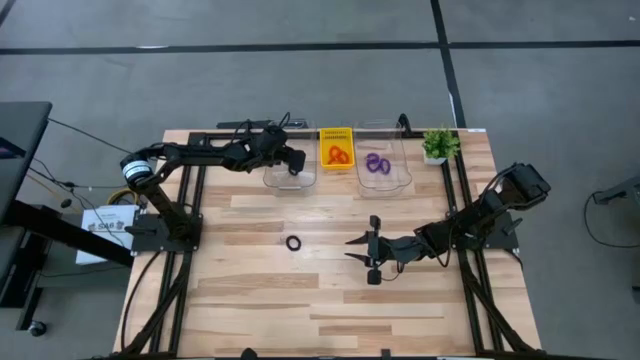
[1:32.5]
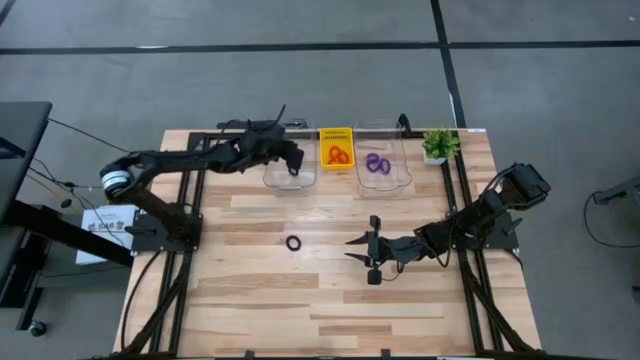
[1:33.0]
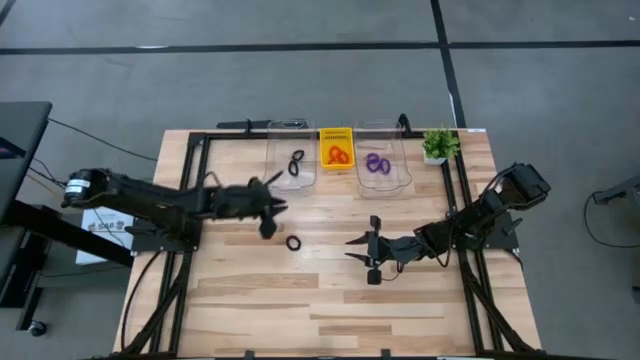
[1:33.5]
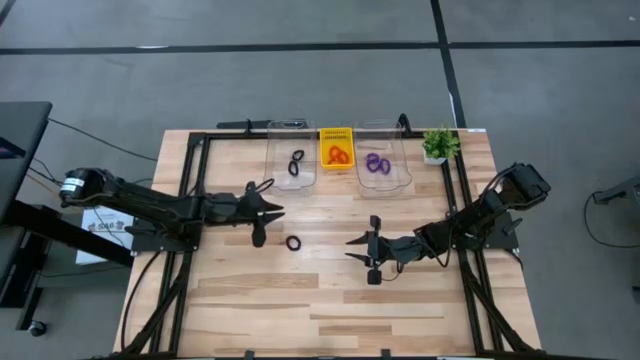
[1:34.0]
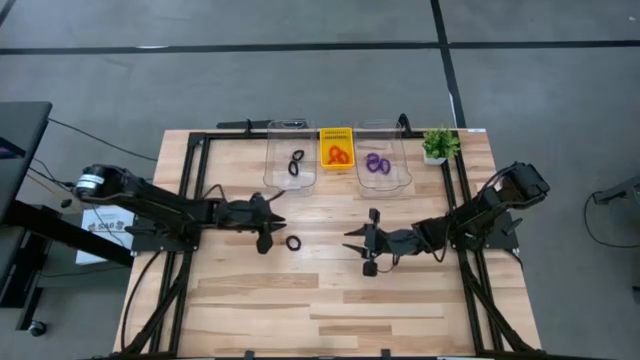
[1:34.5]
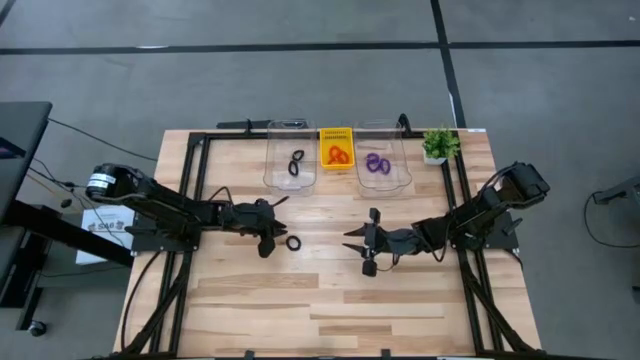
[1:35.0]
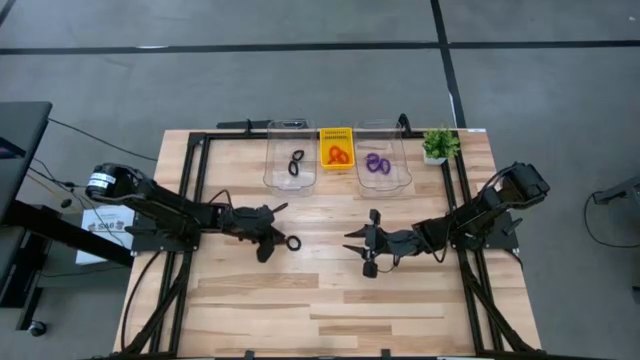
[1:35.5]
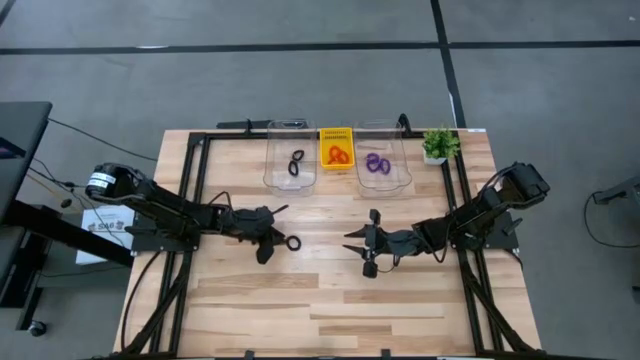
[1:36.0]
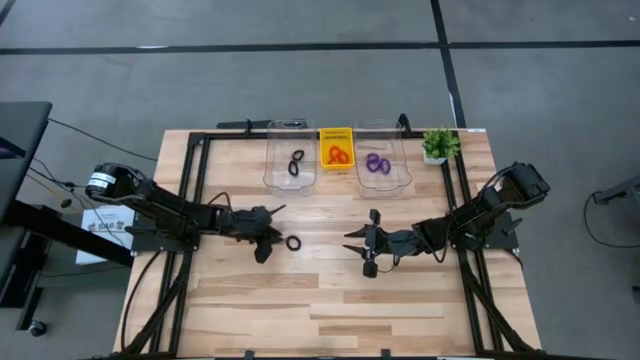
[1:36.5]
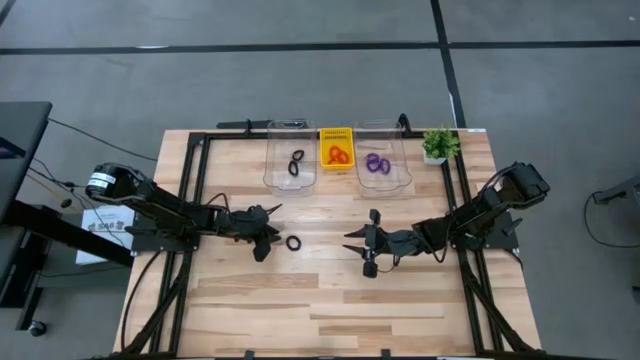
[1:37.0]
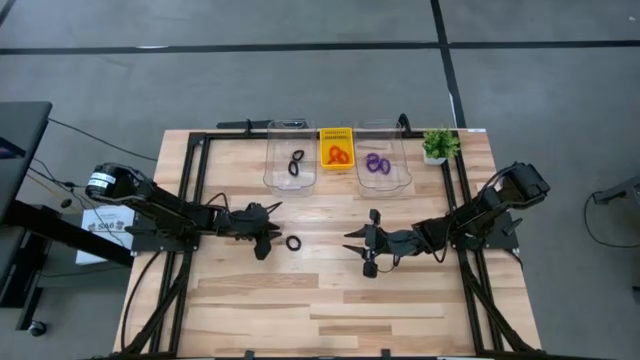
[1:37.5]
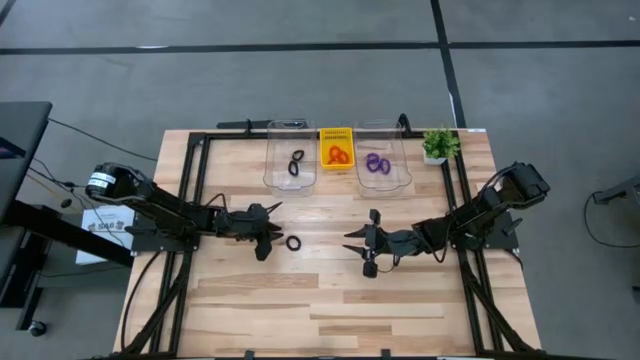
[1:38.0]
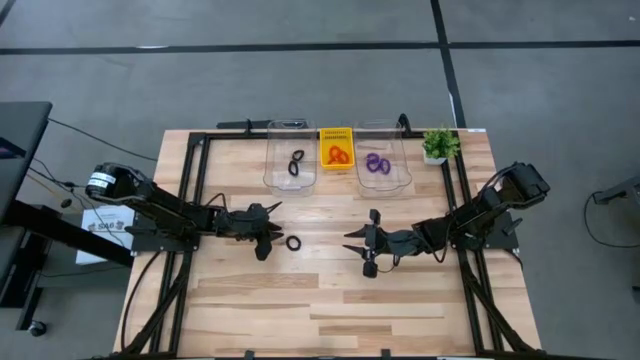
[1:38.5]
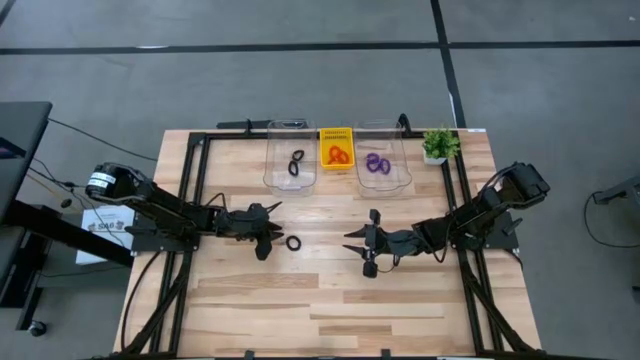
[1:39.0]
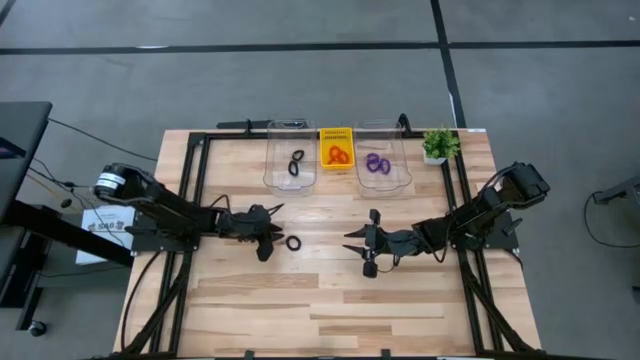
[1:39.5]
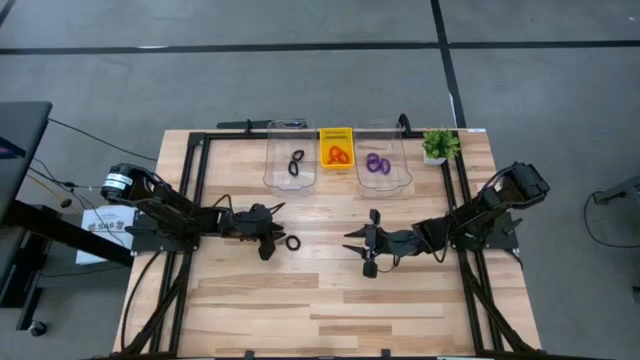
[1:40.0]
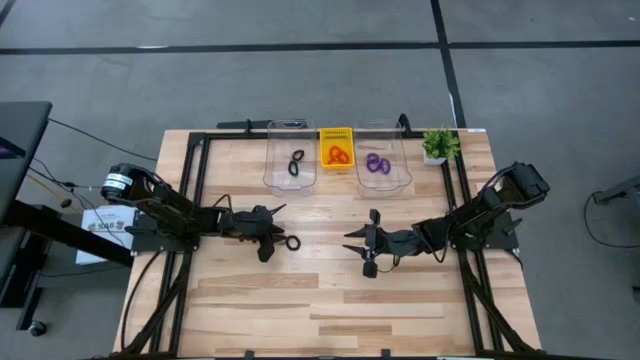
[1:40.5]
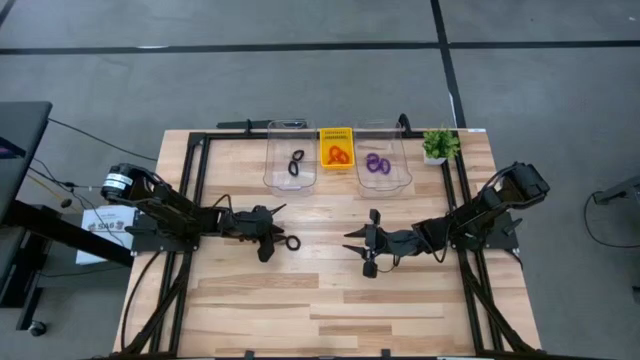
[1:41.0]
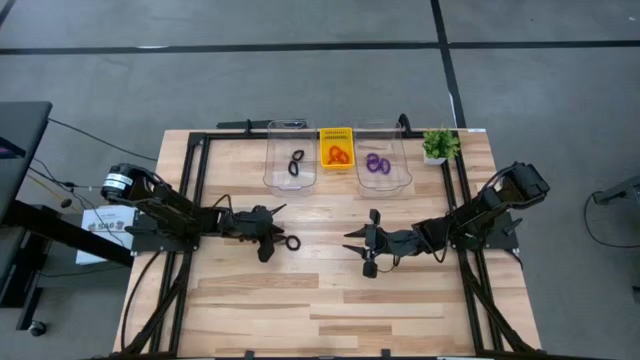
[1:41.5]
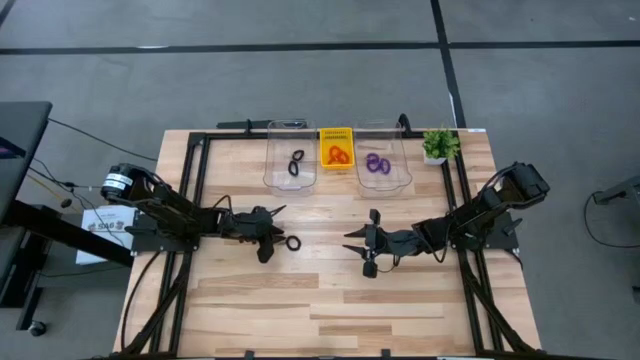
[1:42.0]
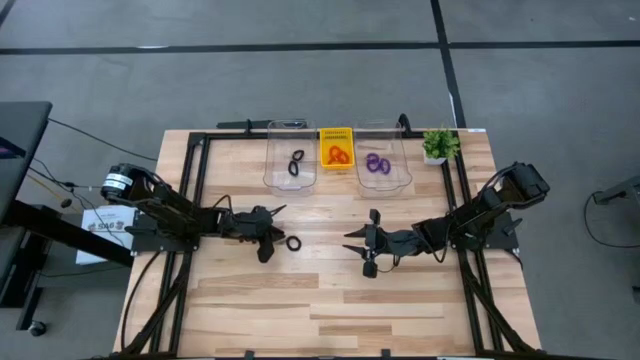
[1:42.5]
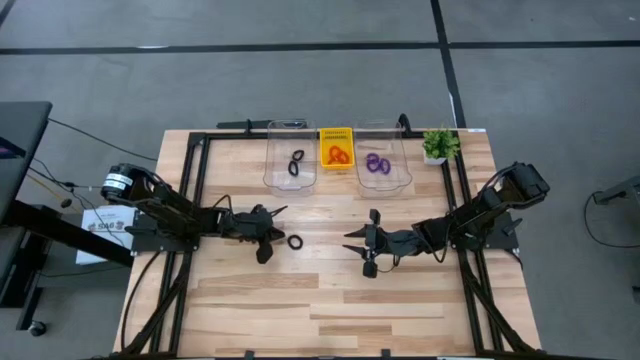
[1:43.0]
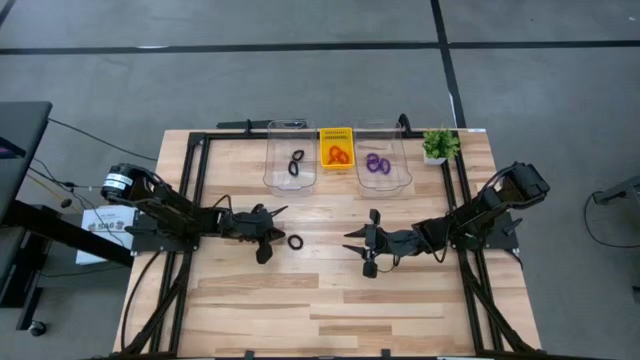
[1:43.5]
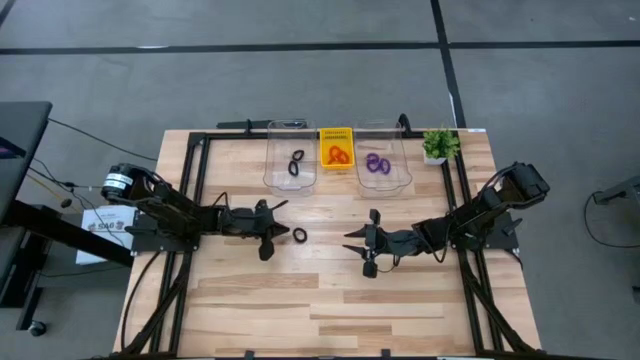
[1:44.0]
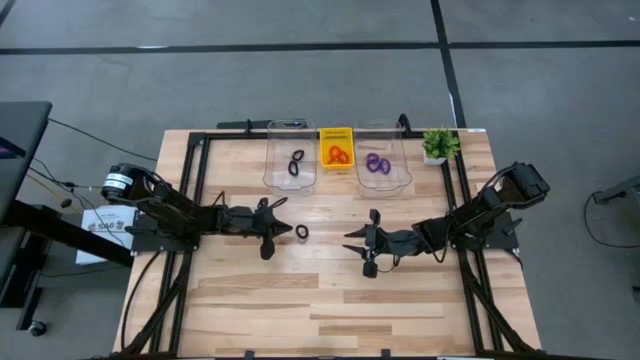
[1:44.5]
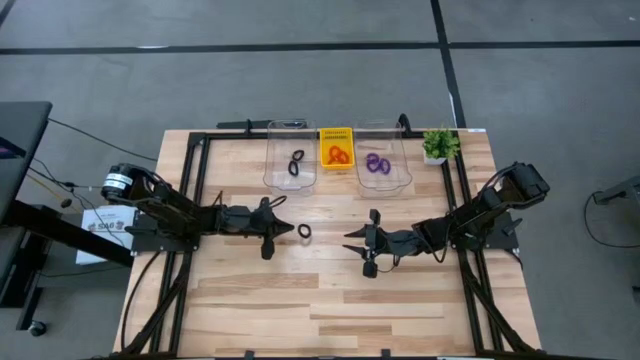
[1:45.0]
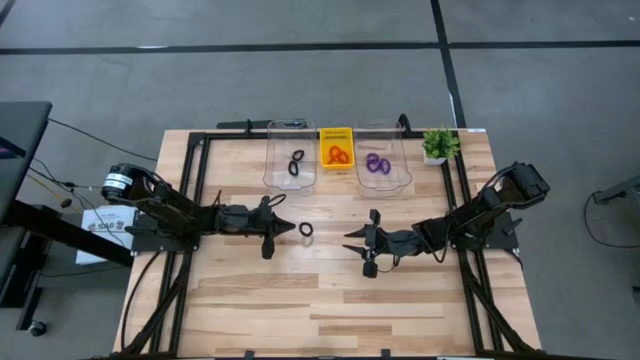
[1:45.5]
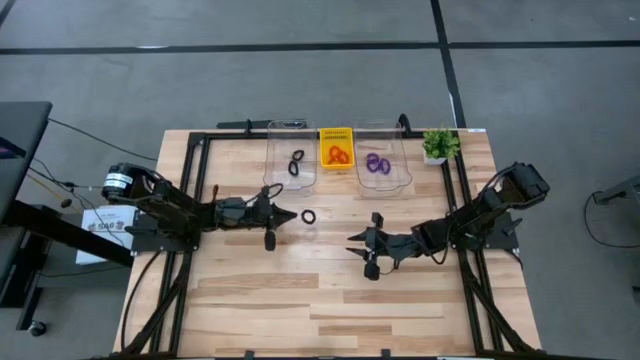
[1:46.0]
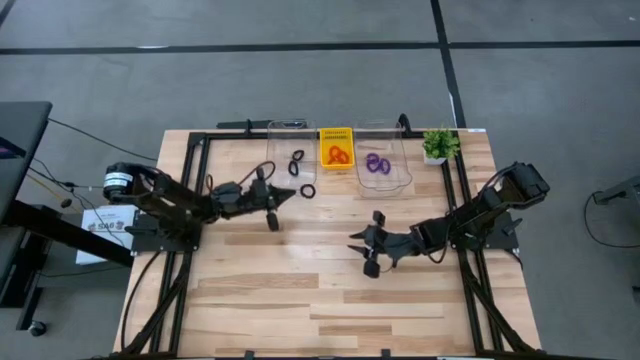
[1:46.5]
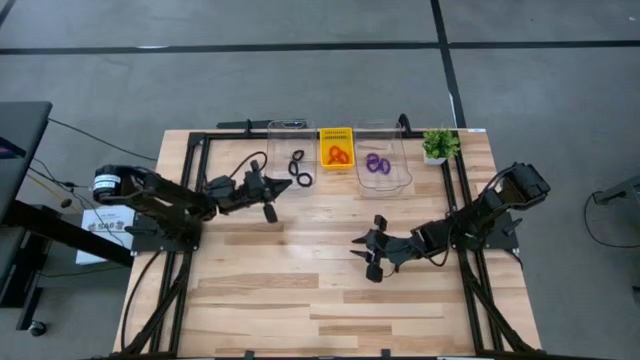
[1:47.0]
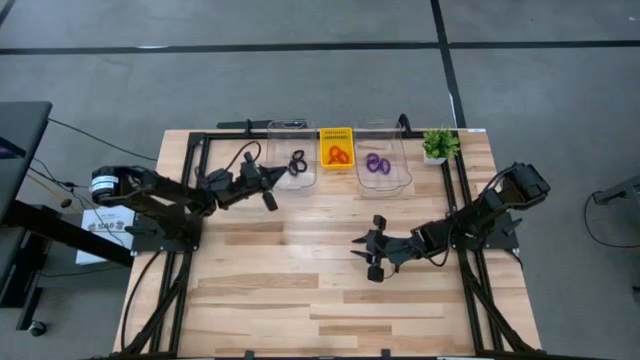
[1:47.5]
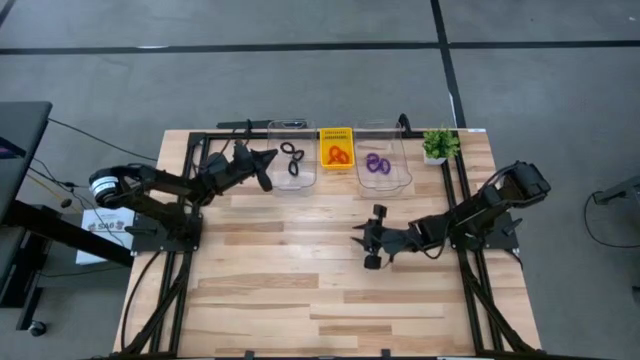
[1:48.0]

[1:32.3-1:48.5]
Task: Sort spring keychains
Put the black spring keychain into the left transparent bin

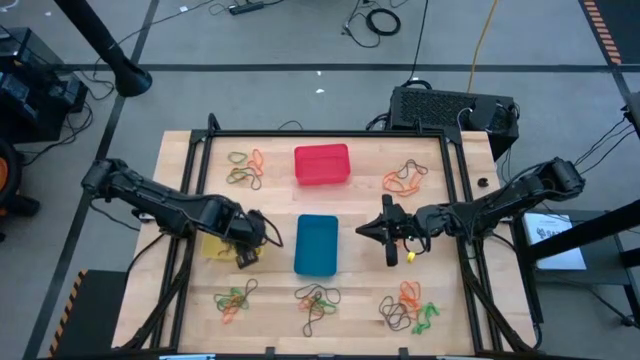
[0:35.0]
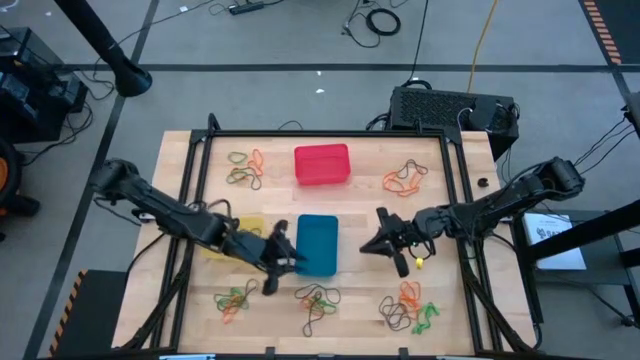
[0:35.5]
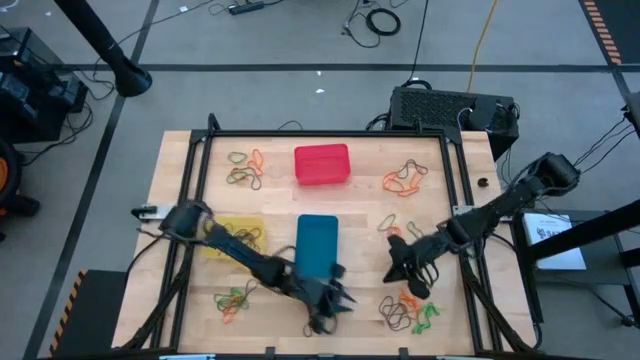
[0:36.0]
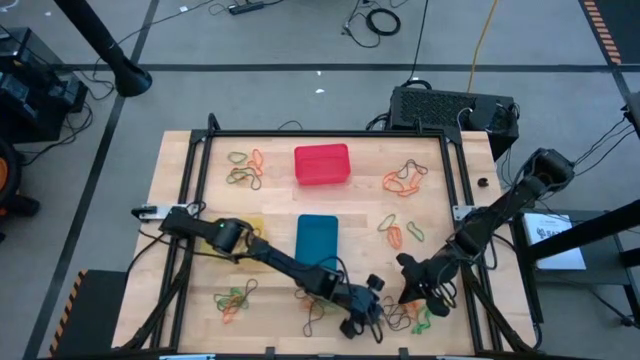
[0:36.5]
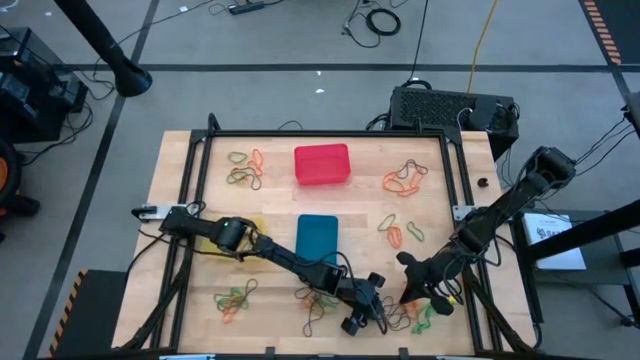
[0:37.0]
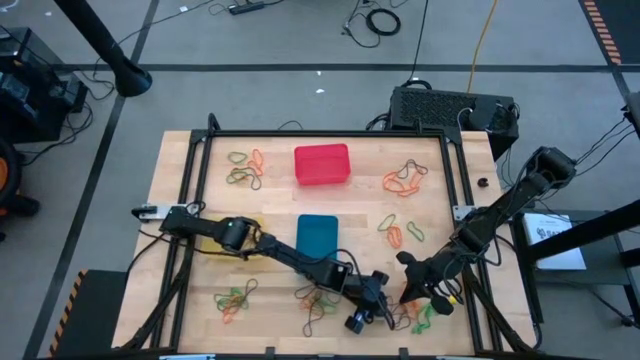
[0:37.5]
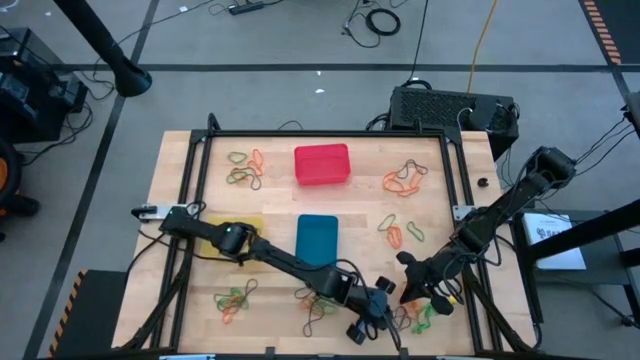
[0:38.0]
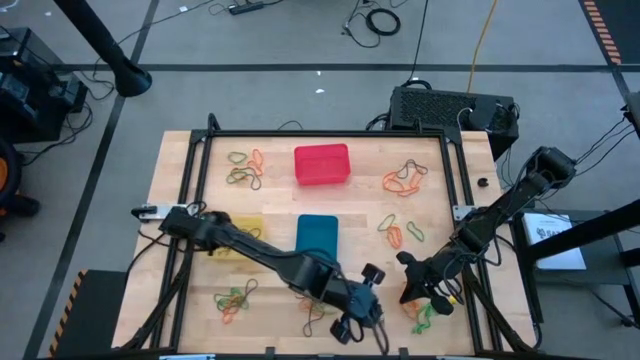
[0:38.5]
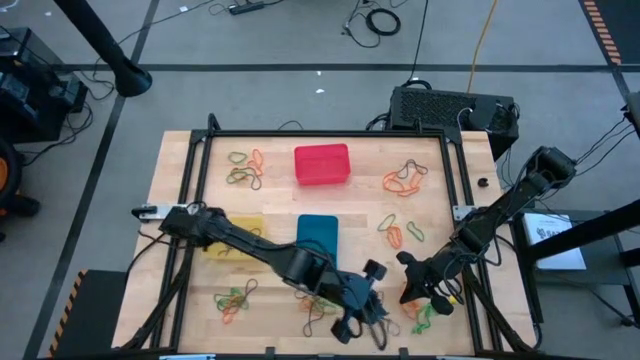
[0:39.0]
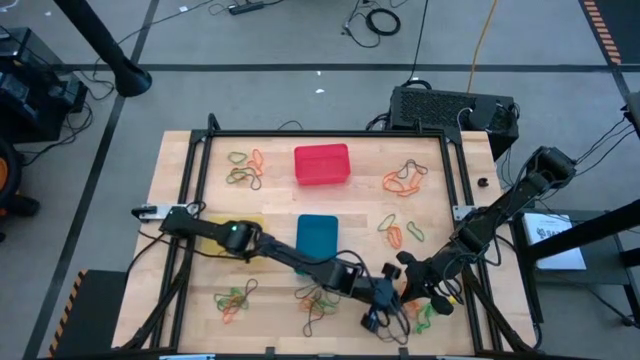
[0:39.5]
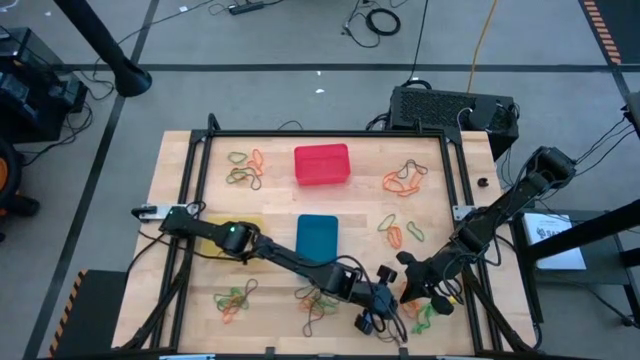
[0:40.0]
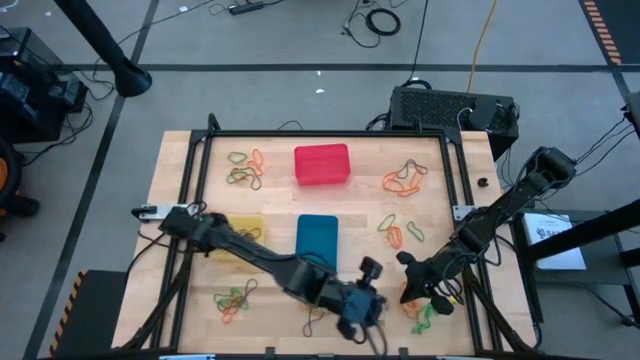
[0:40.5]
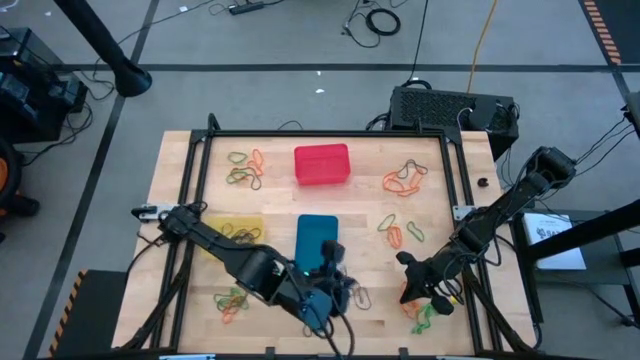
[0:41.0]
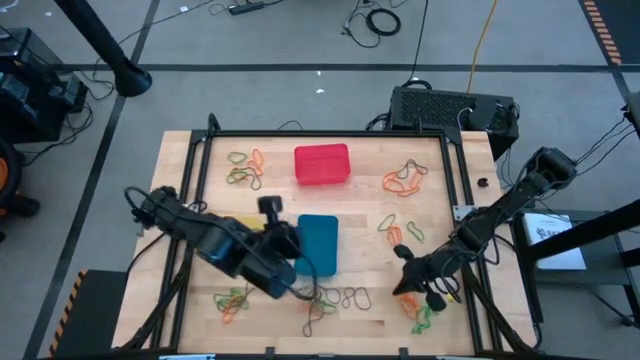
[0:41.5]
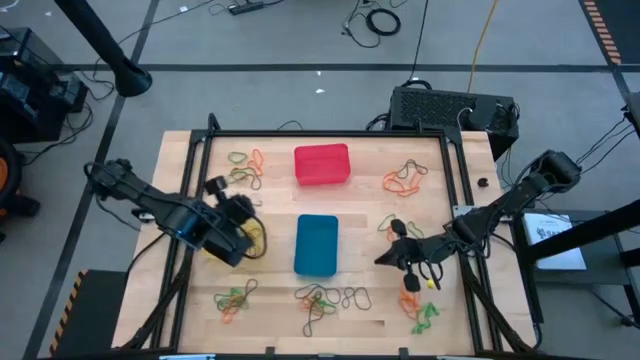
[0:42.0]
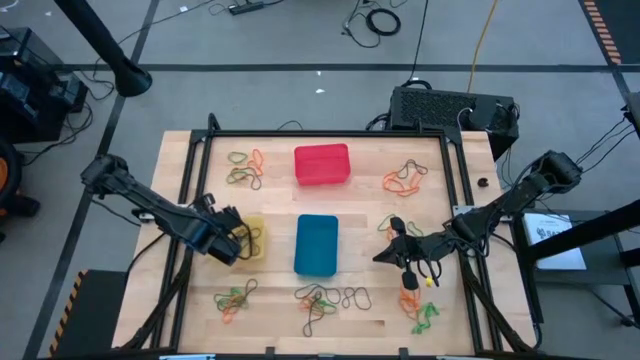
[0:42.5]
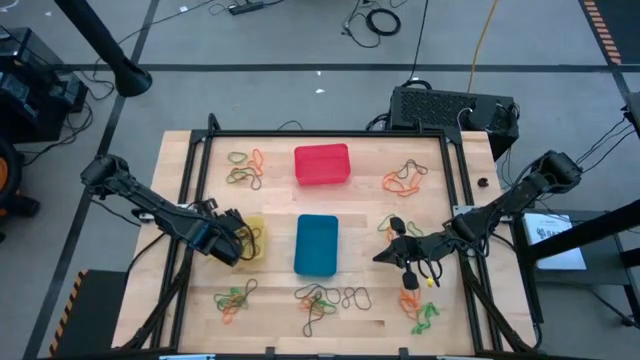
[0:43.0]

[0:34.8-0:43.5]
Task: Sort rubber bands into baskets
Put the purple rubber band into the yellow bin
